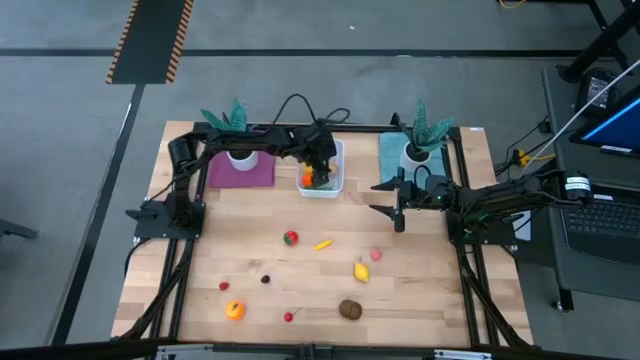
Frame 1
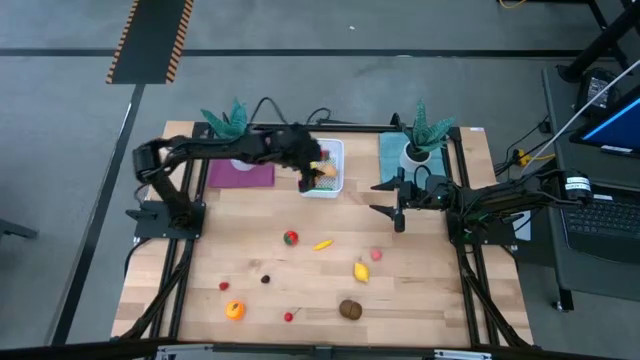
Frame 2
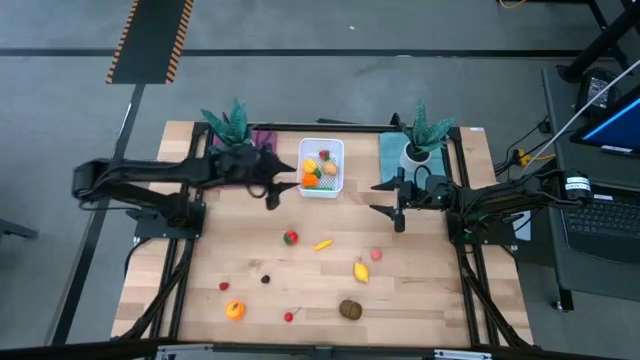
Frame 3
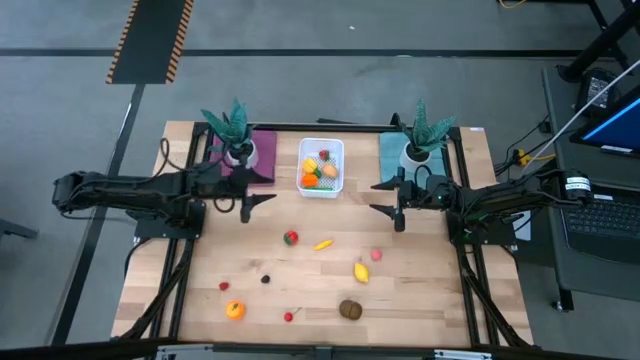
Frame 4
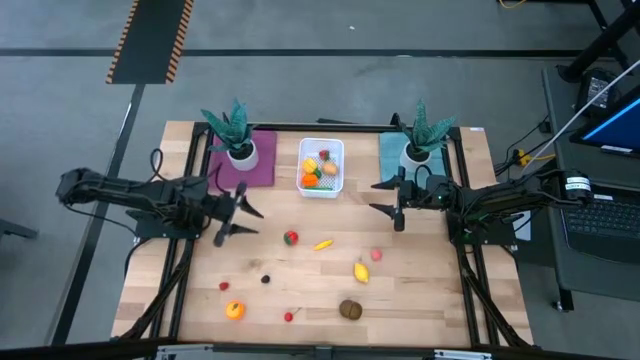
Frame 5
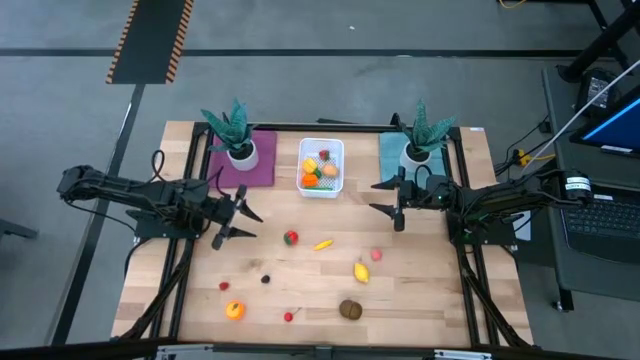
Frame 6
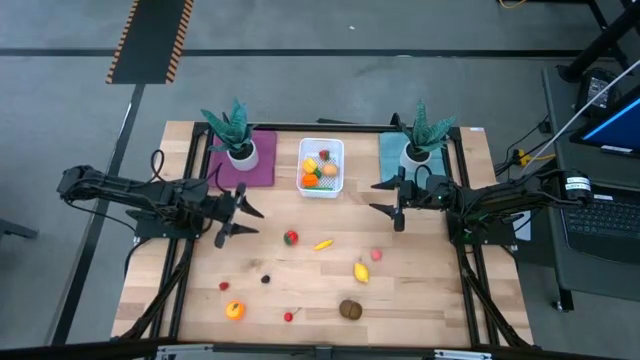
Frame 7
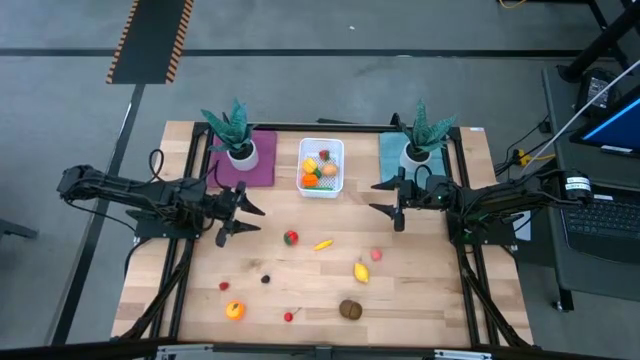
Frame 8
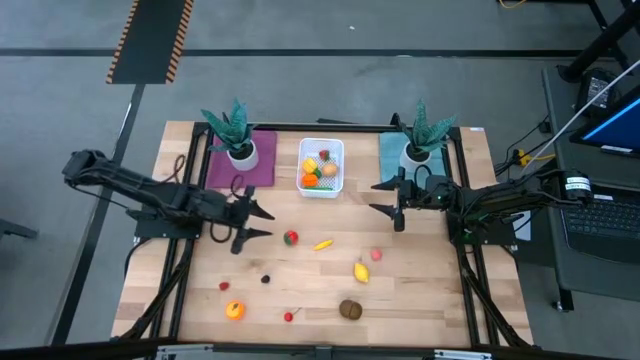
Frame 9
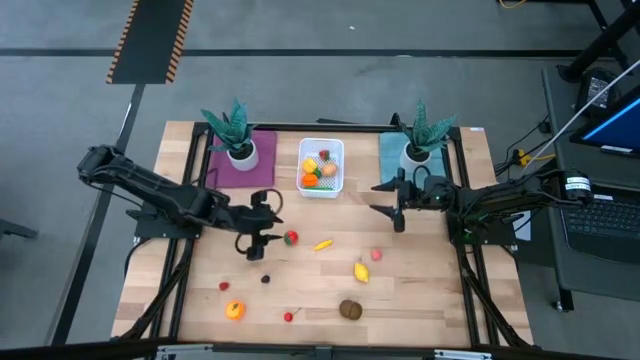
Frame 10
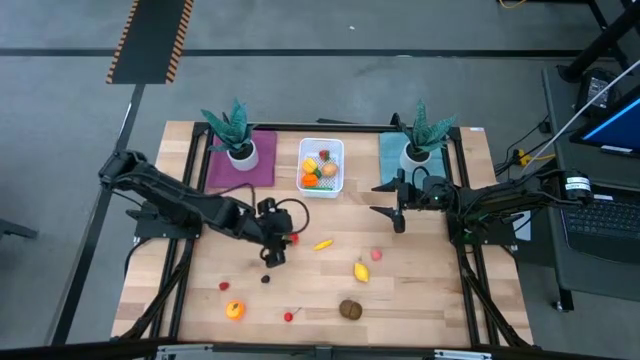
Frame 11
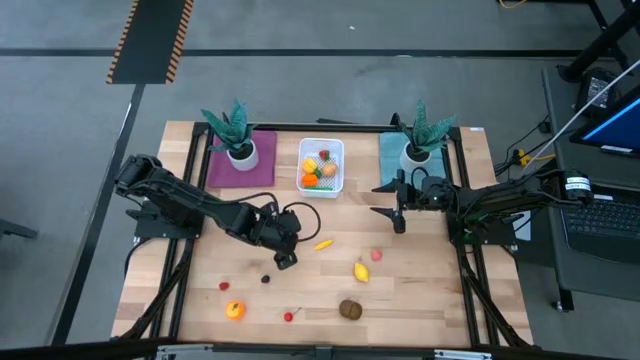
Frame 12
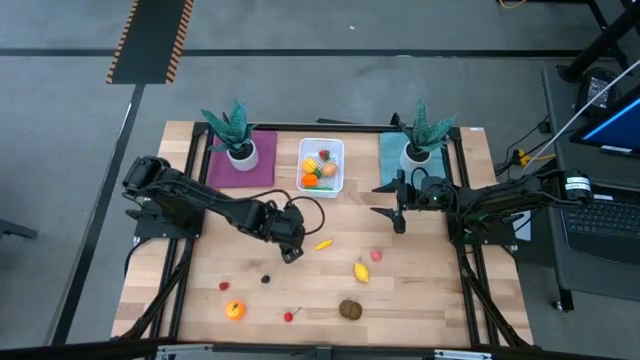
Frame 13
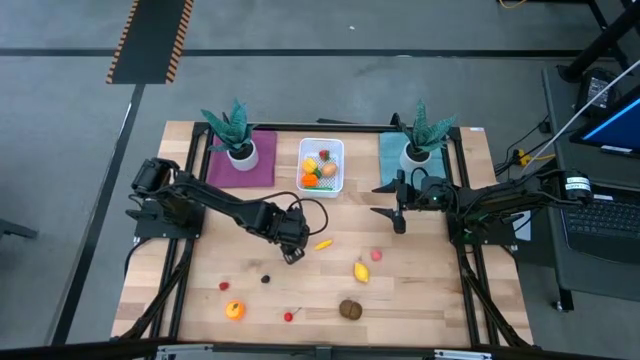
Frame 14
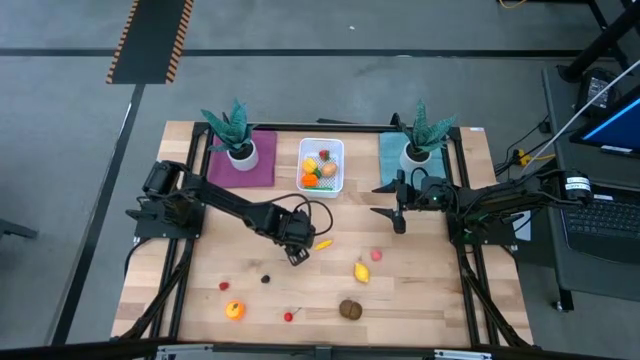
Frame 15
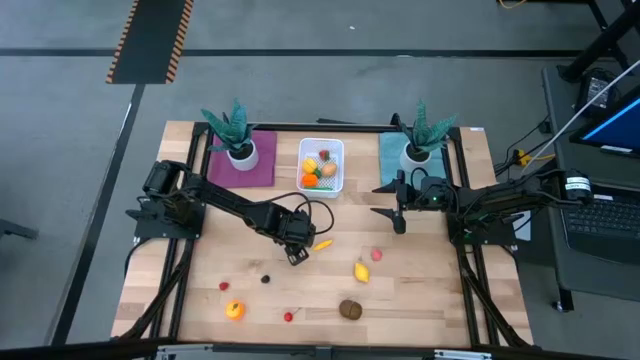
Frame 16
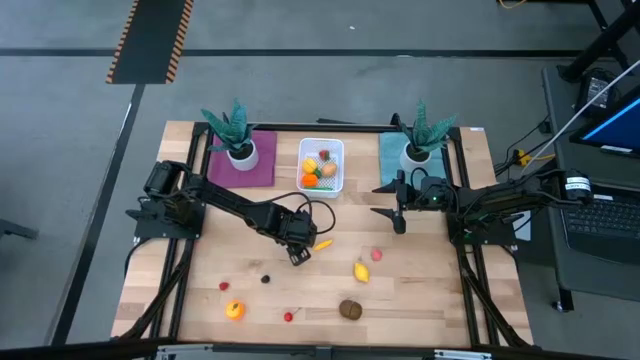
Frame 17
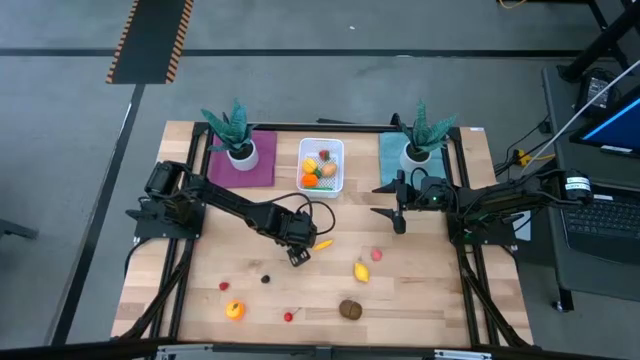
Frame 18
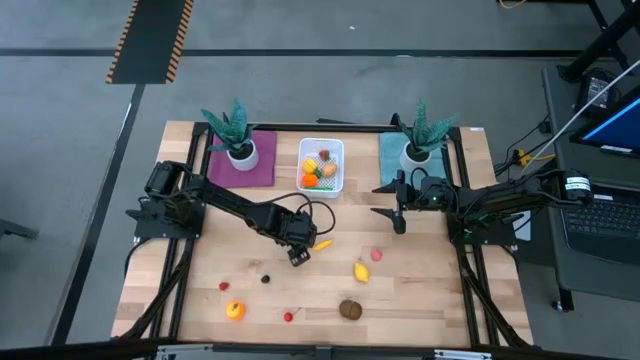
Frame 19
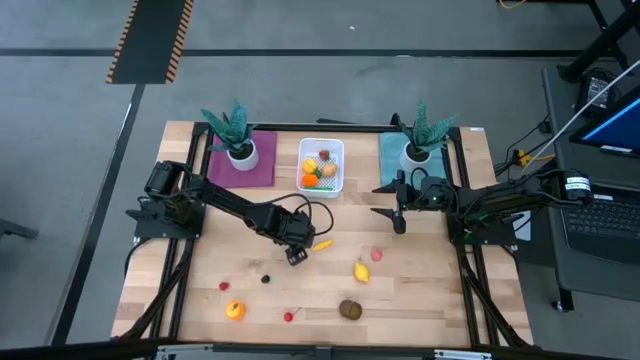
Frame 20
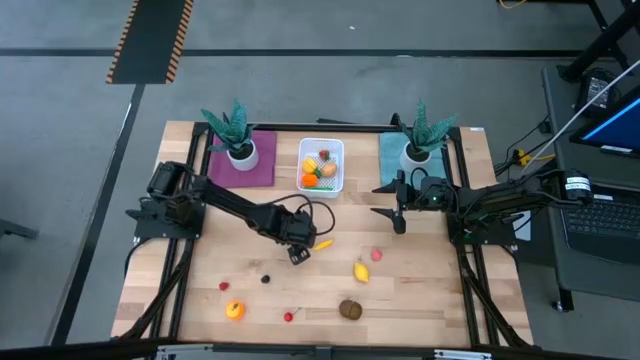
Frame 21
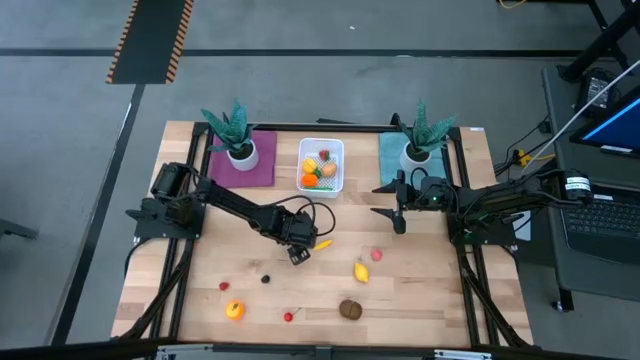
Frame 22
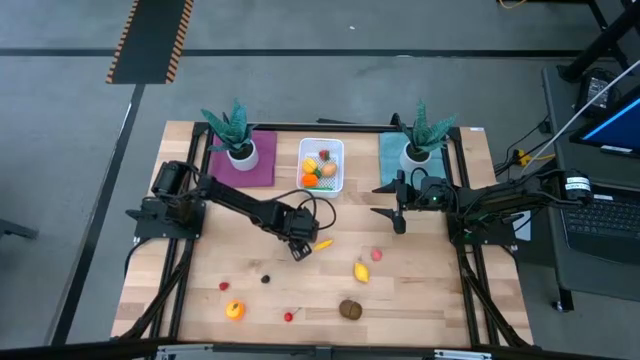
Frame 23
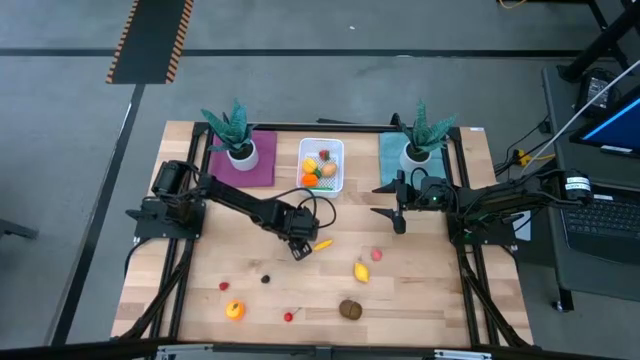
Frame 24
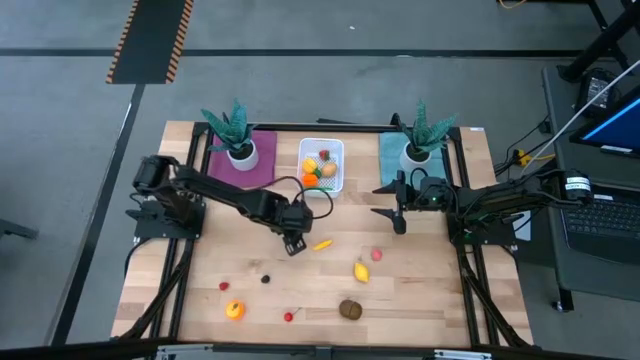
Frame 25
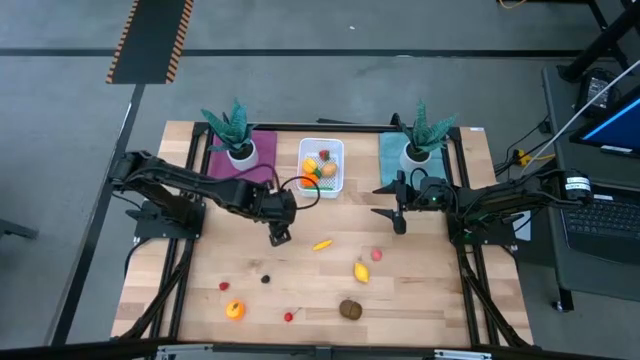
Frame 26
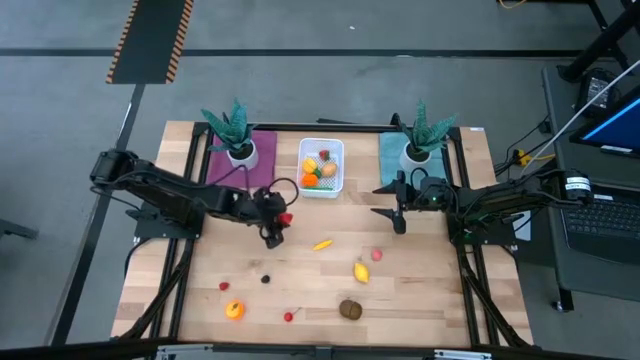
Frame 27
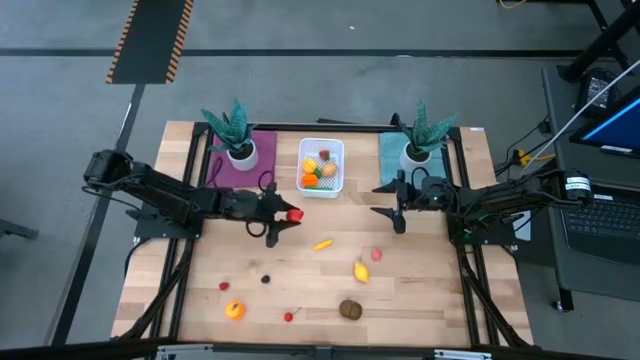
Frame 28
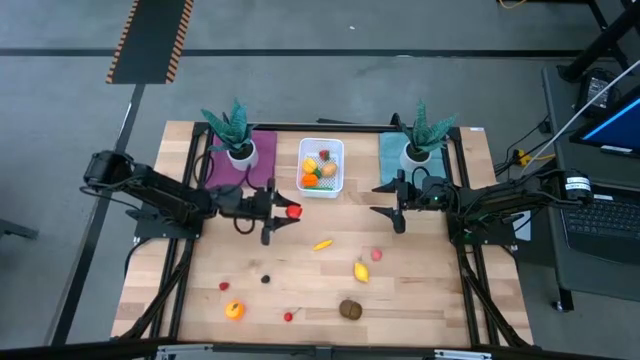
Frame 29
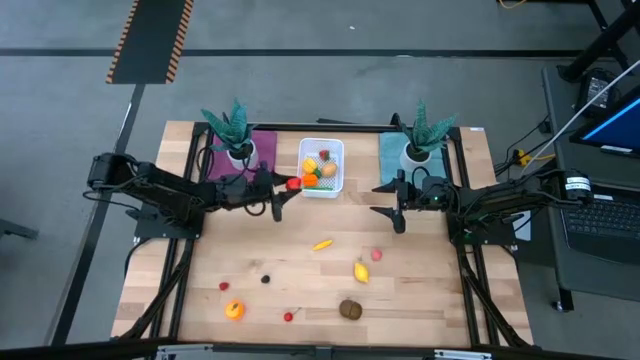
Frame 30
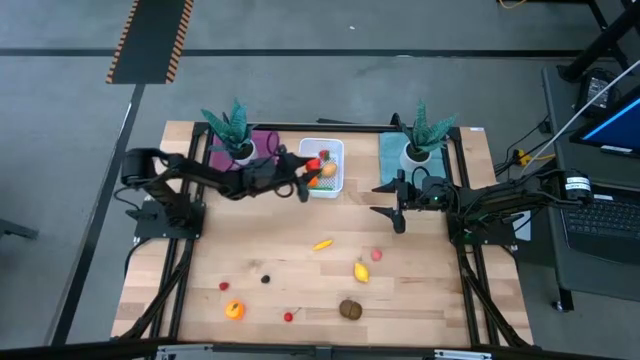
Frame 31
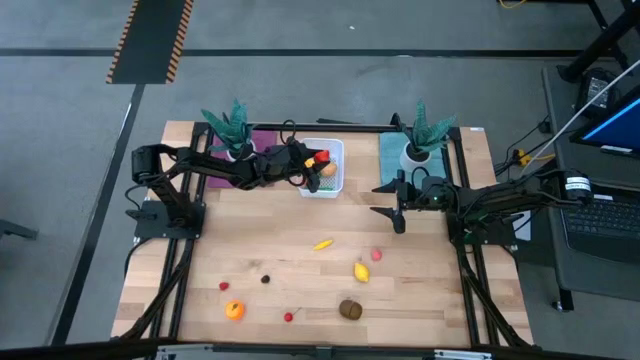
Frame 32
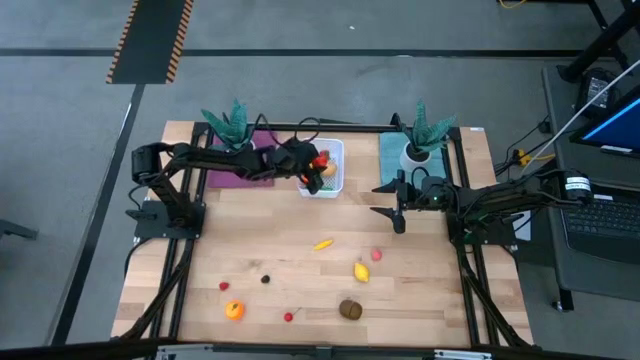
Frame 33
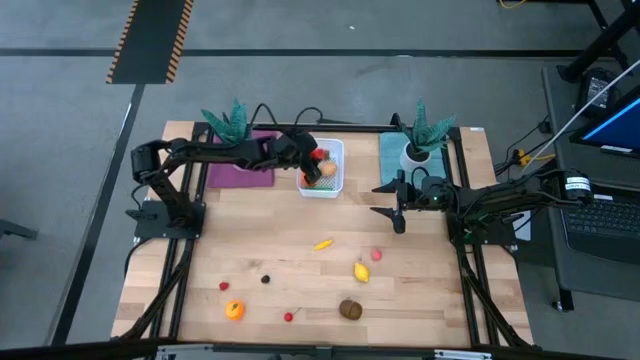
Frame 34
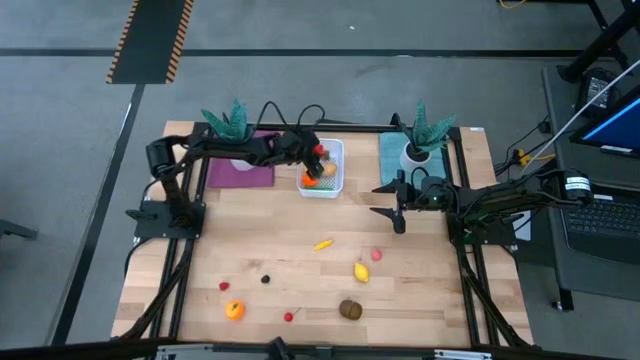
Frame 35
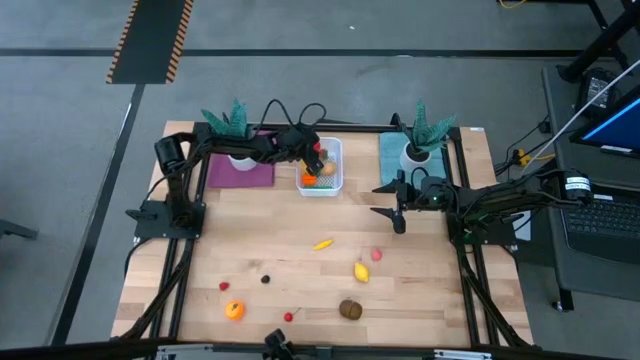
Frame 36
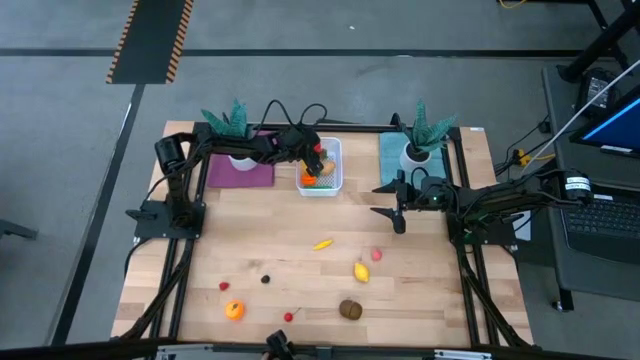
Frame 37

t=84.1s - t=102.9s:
Task: Pick and placing Produce into tupperware
Put the red strawberry into the white bin

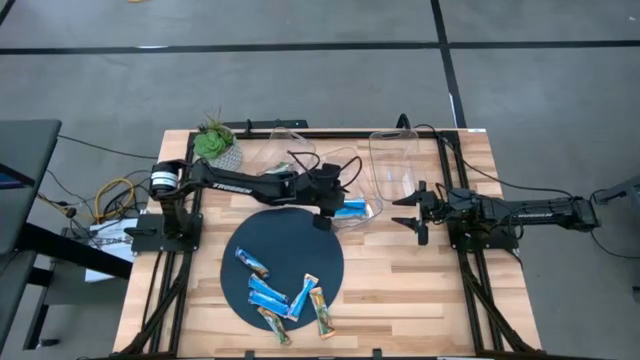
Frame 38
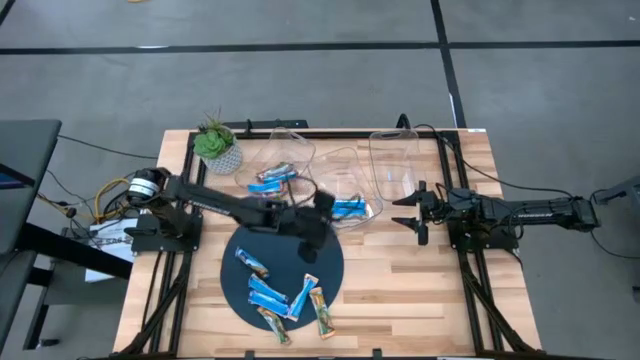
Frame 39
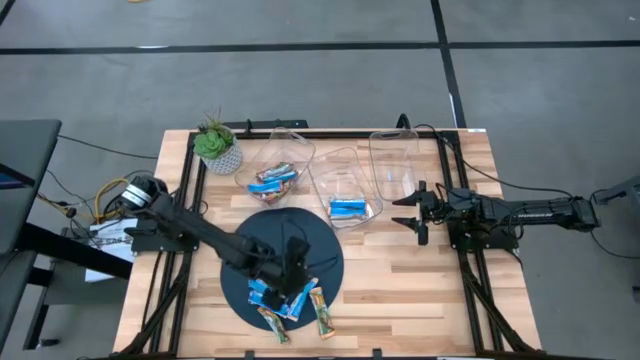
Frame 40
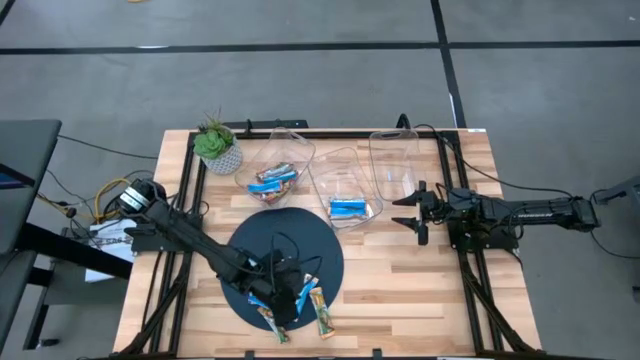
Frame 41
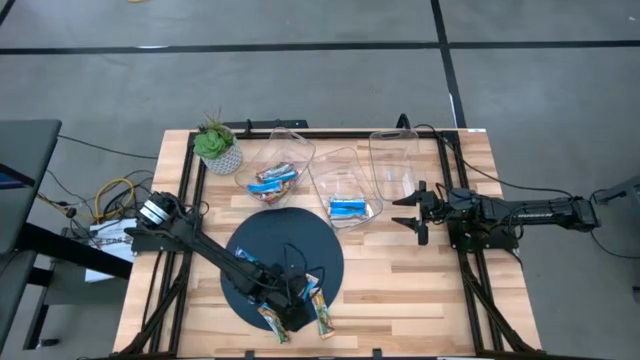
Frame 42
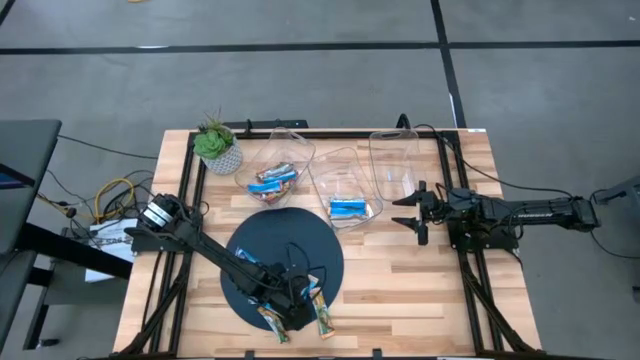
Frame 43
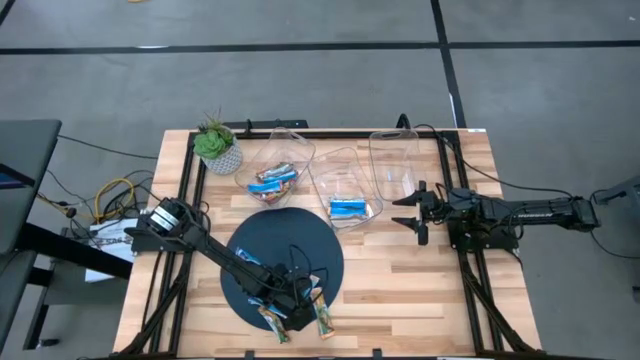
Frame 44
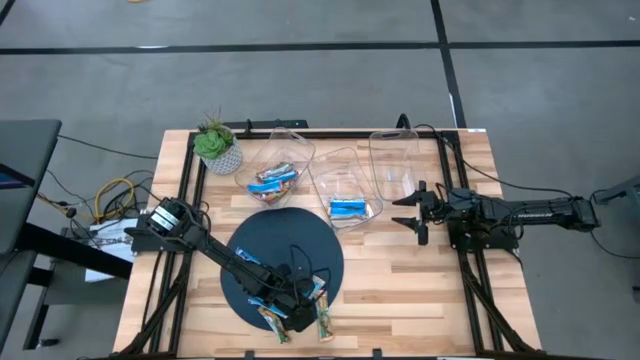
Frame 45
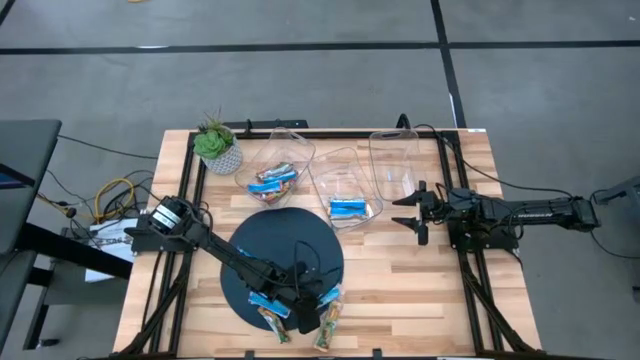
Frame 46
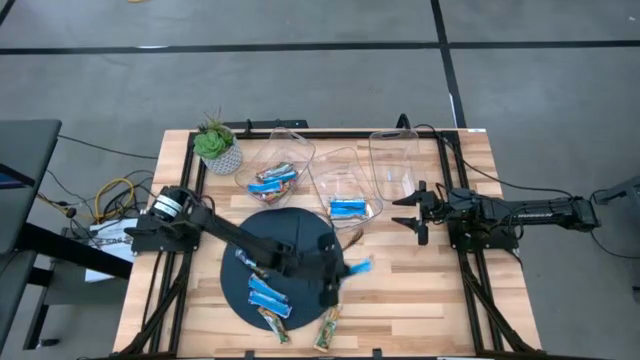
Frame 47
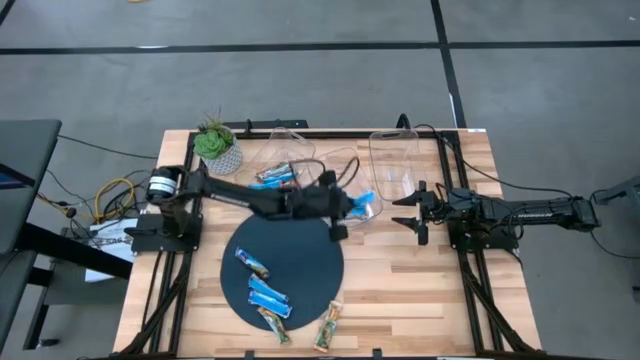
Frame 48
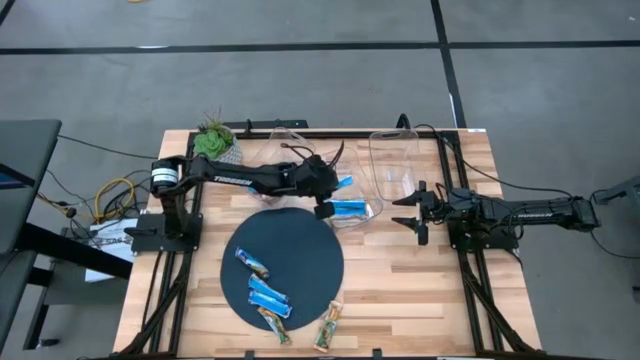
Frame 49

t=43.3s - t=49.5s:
Task: Pick and place Granola Bars by type
Put the yellow granola bar into the middle transparent bin
